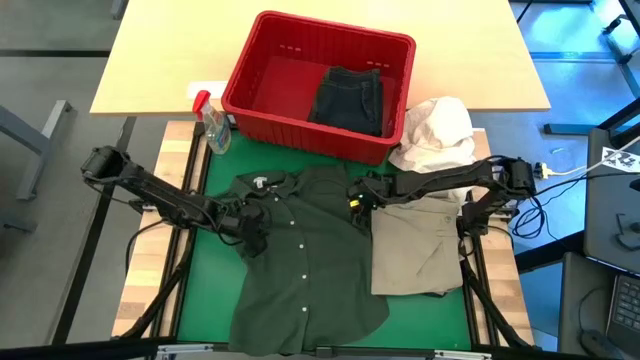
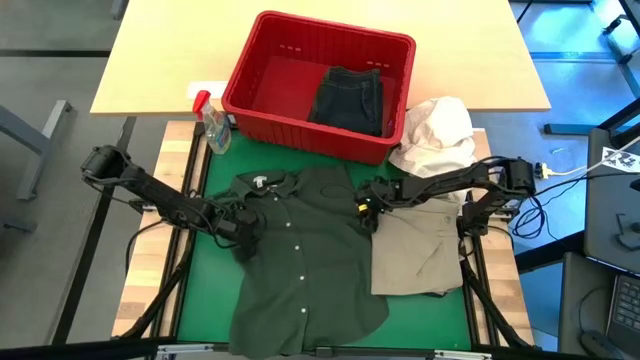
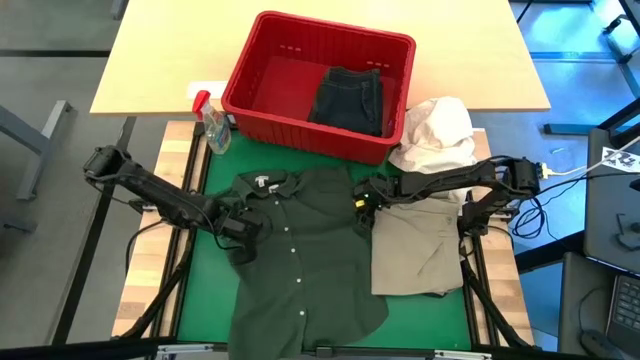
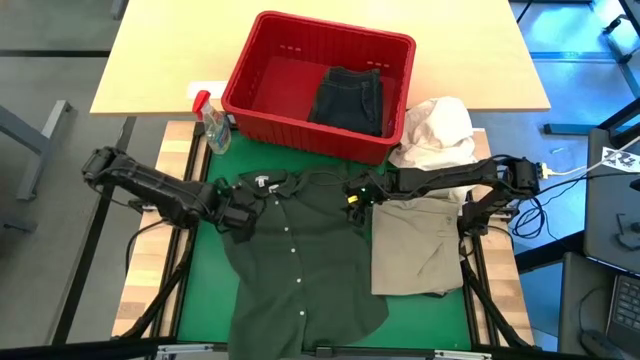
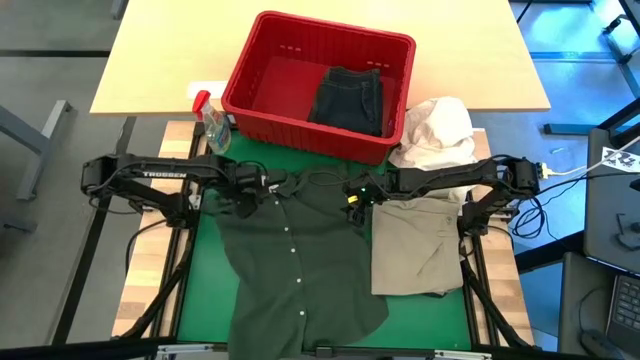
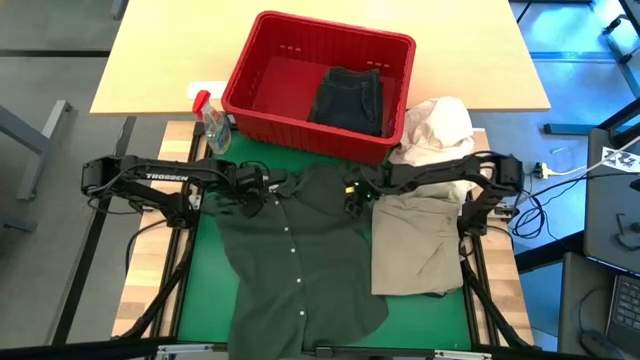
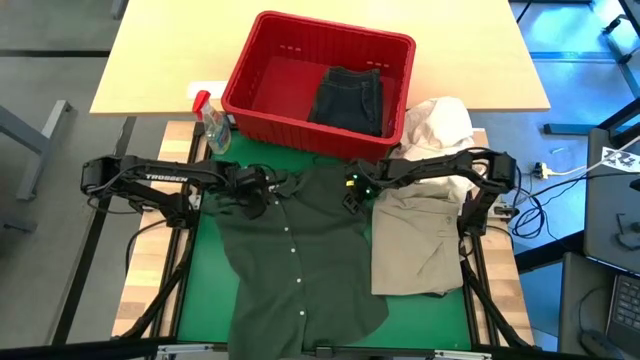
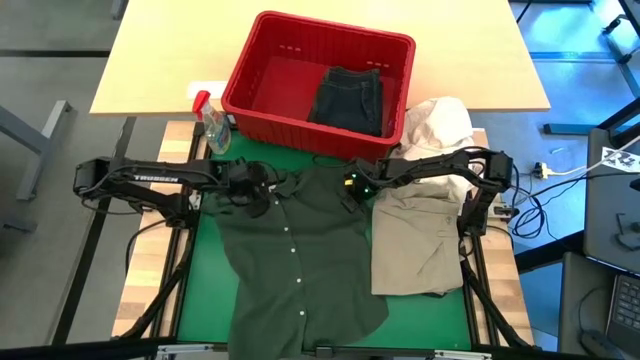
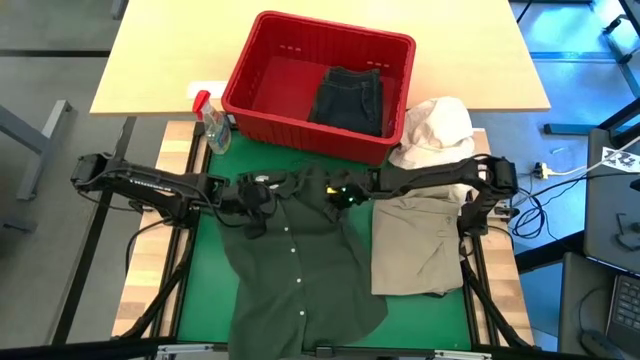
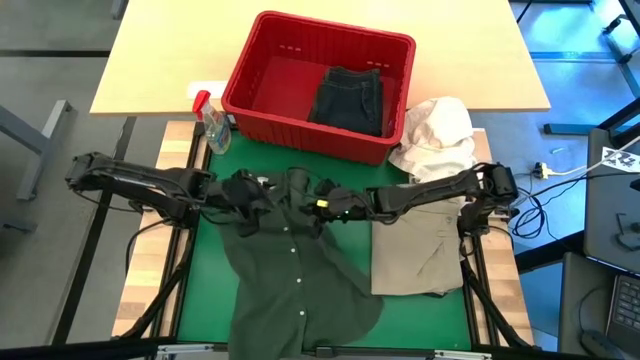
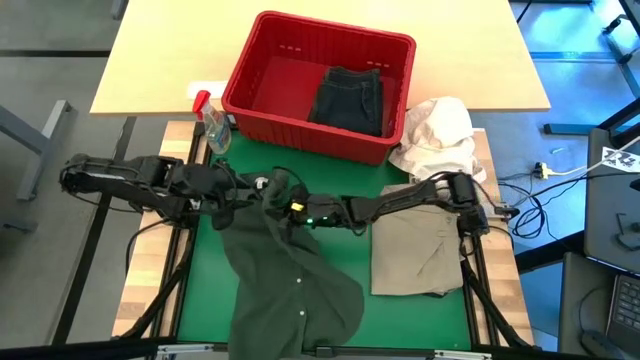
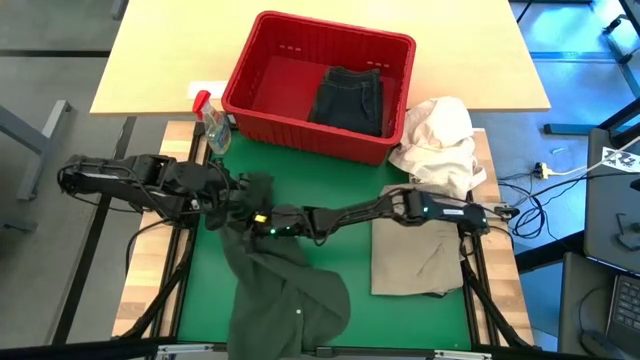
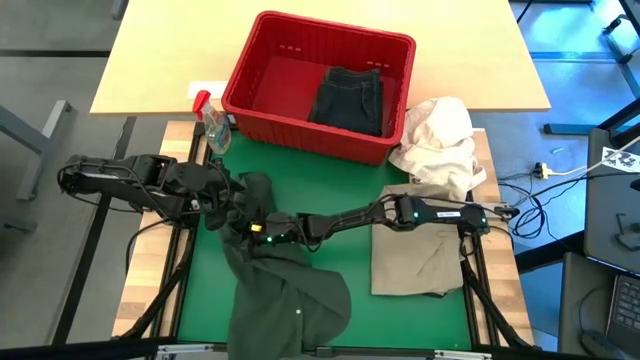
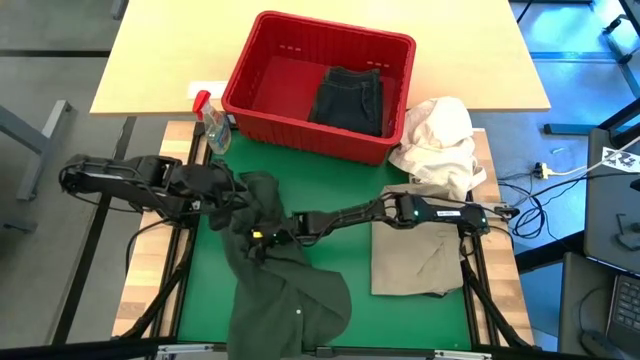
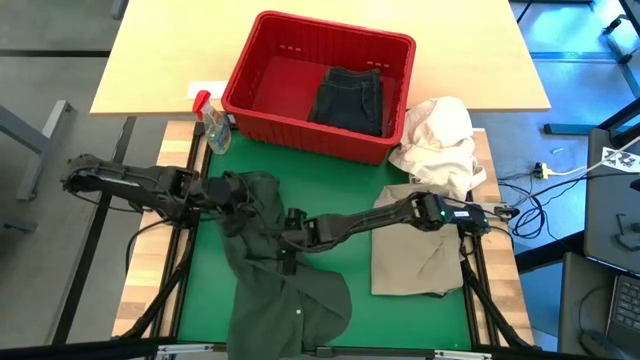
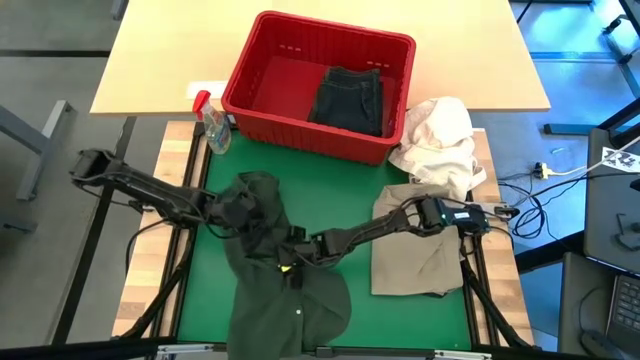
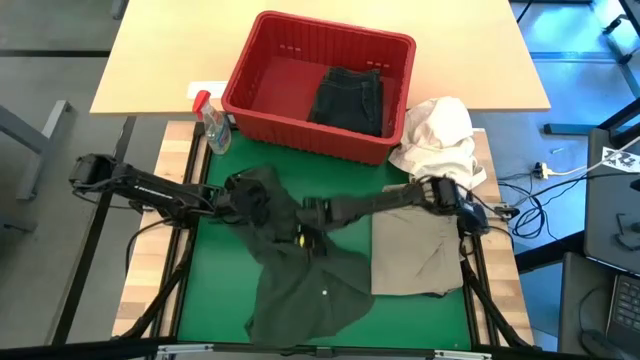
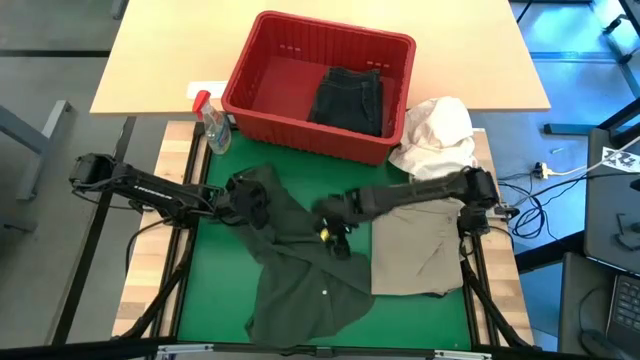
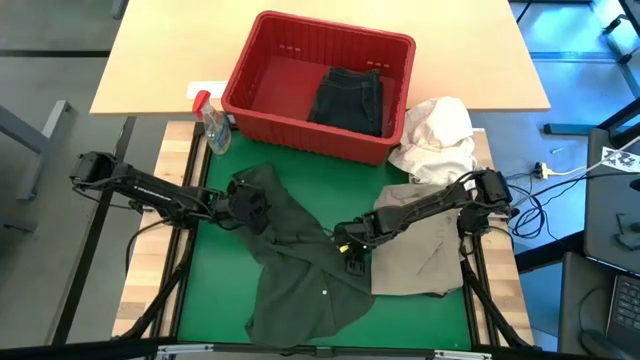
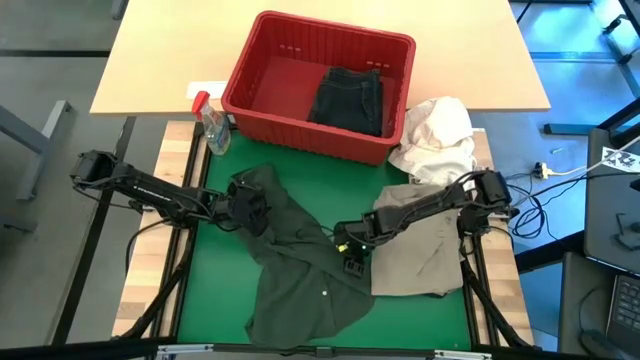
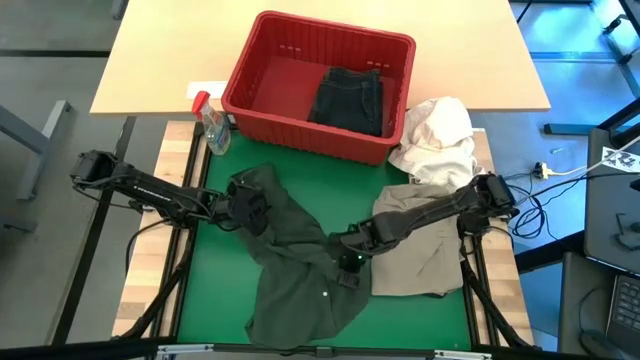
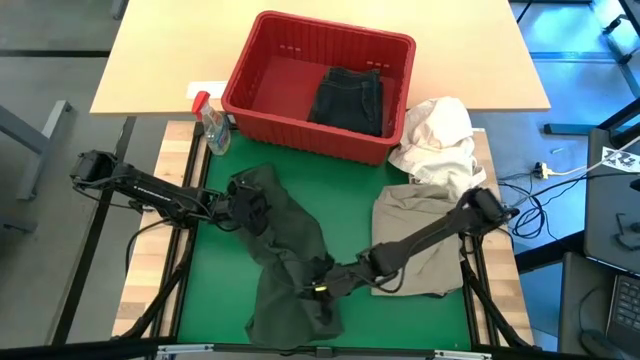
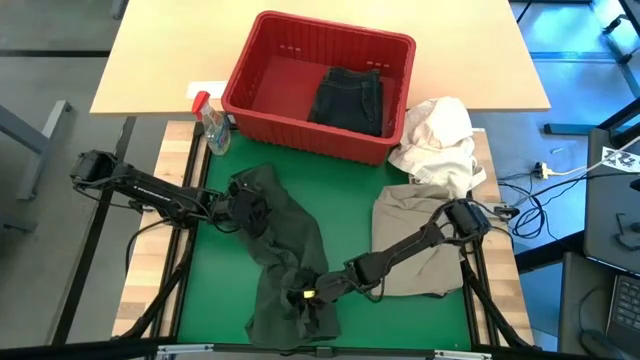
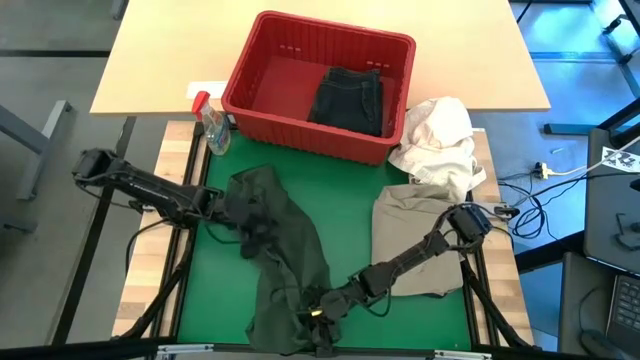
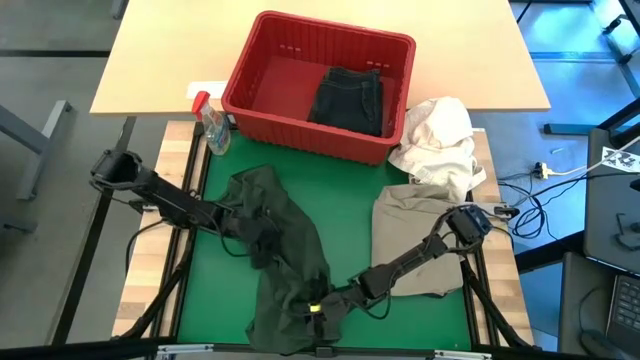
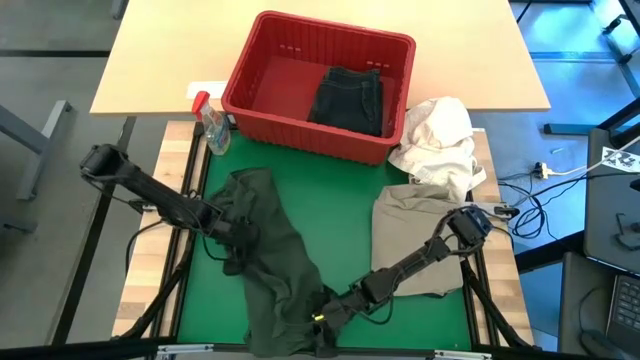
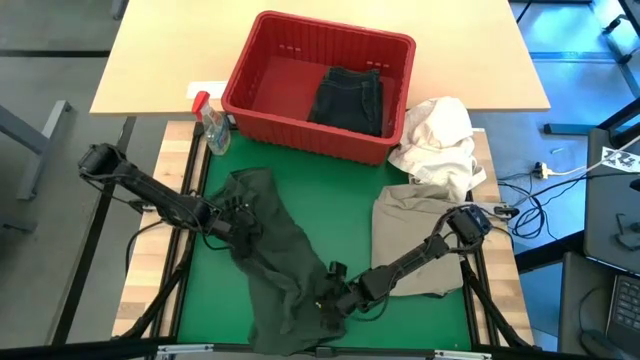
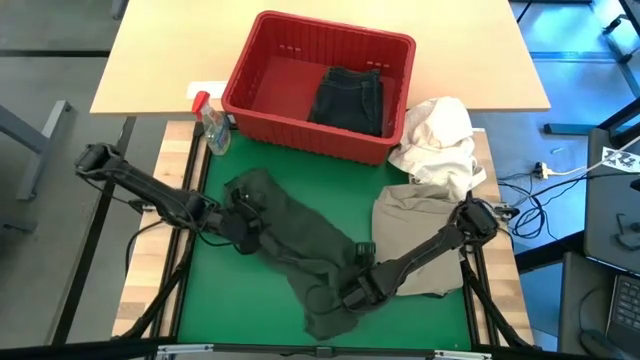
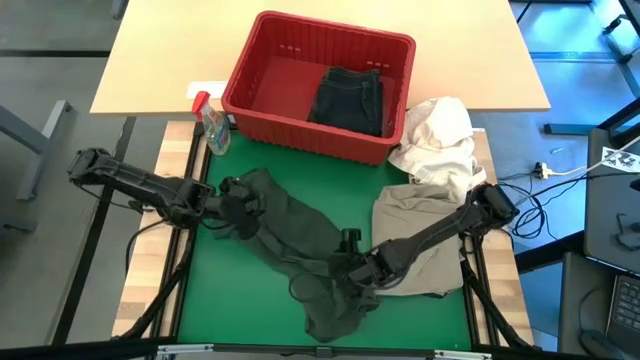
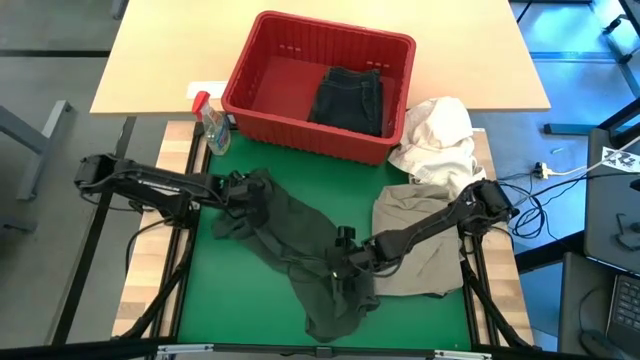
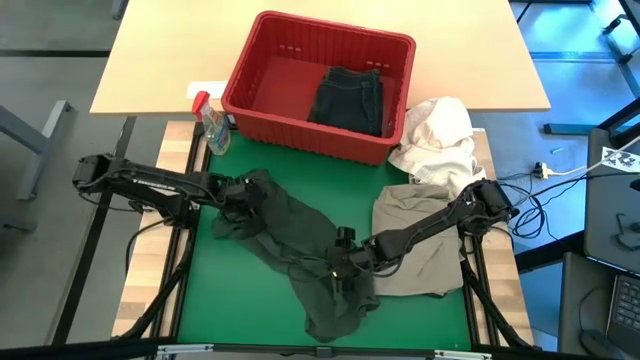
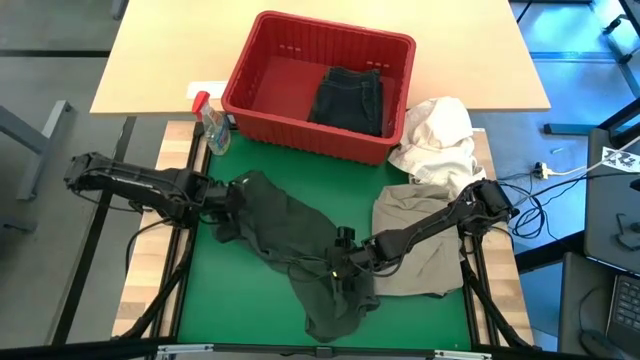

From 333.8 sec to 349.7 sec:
Task: Fold Laundry from Bin
Fold the green polo shirt

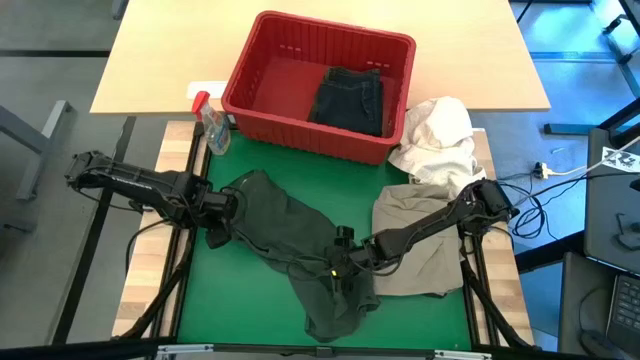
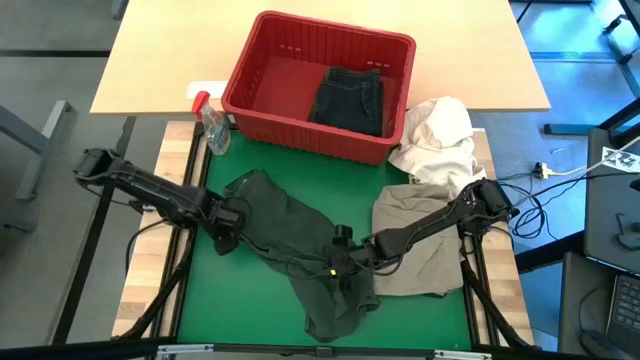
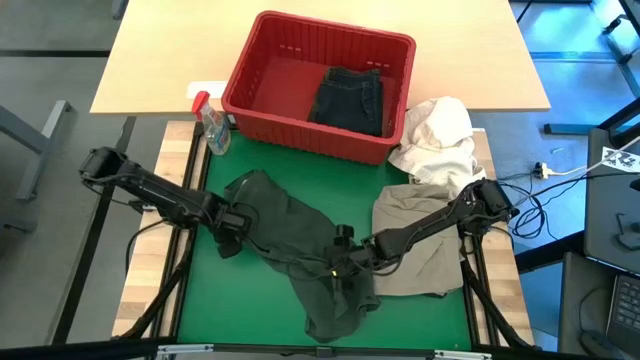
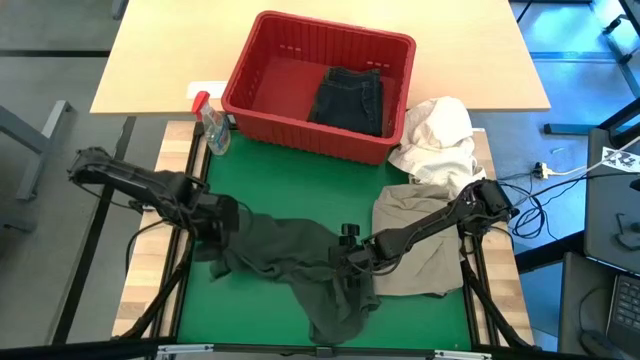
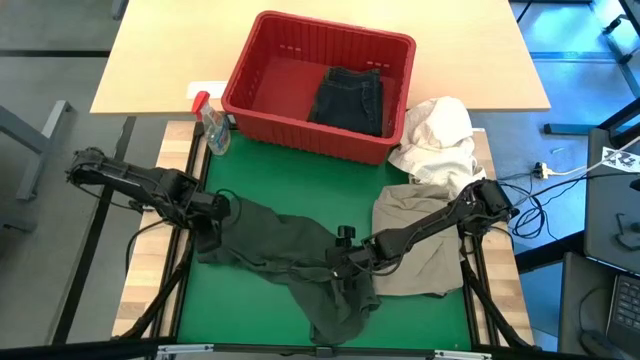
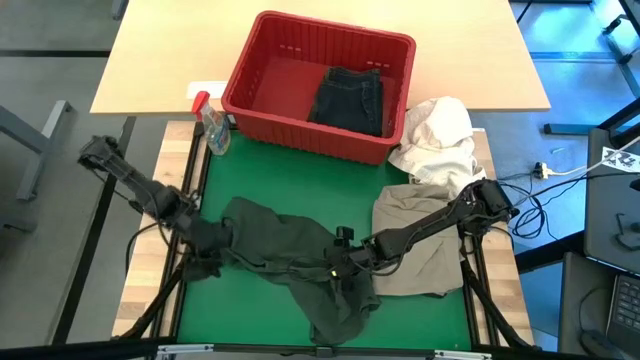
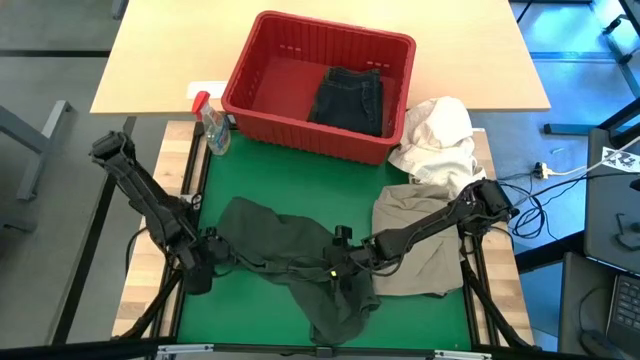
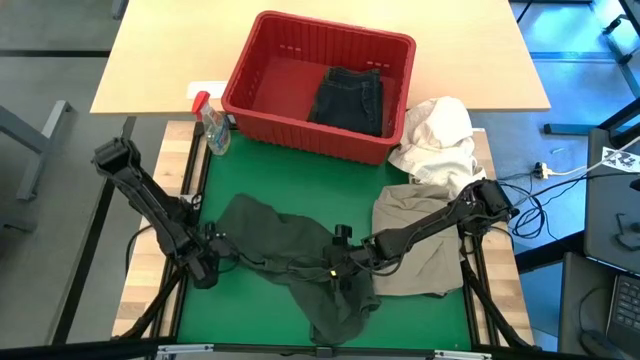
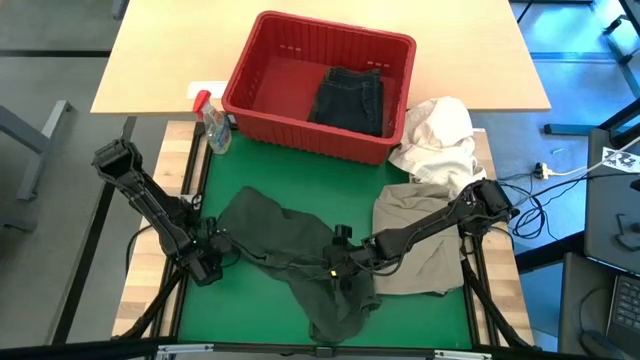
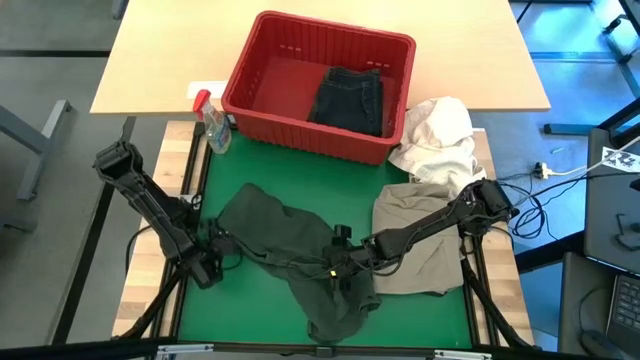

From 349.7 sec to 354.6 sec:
Fold the green polo shirt

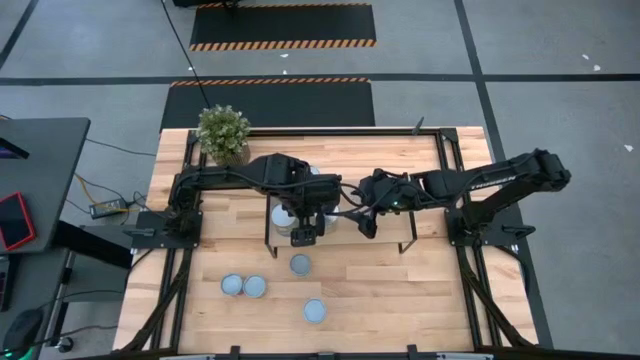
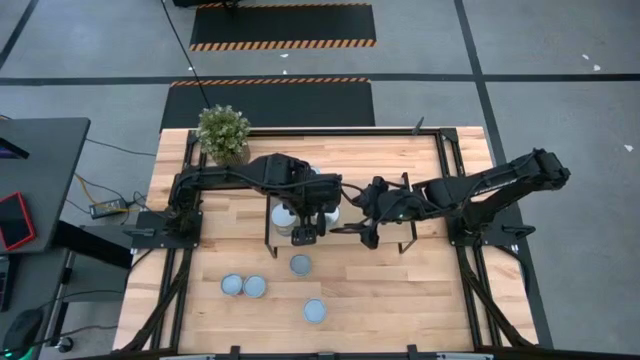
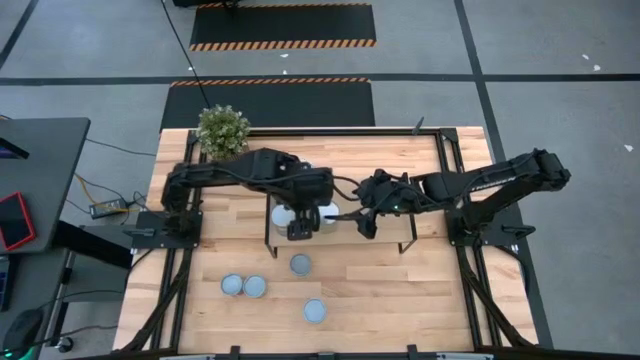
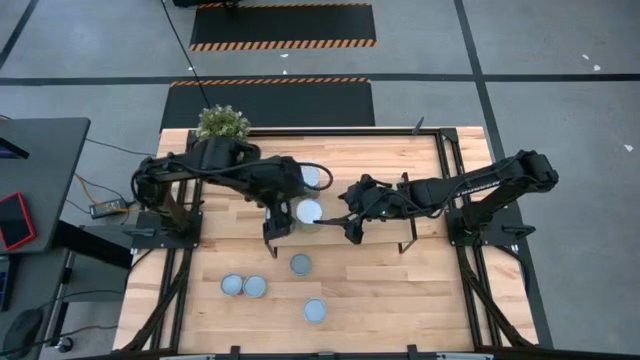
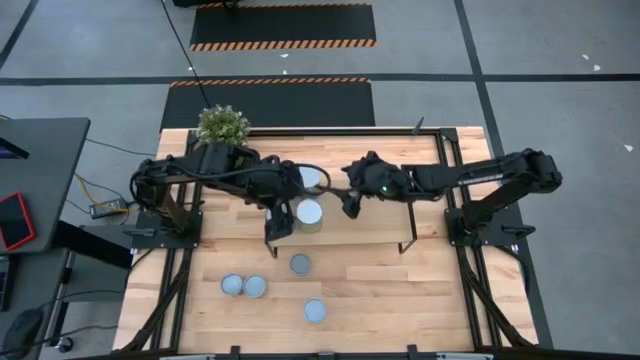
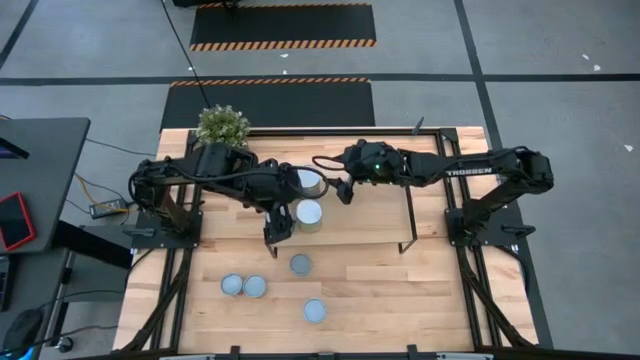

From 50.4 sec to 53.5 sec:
Task: Pick and place cans onto a shelf
Adjust the canned peaches on the shelf
